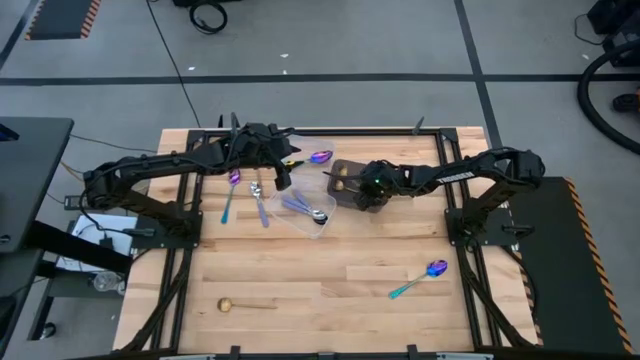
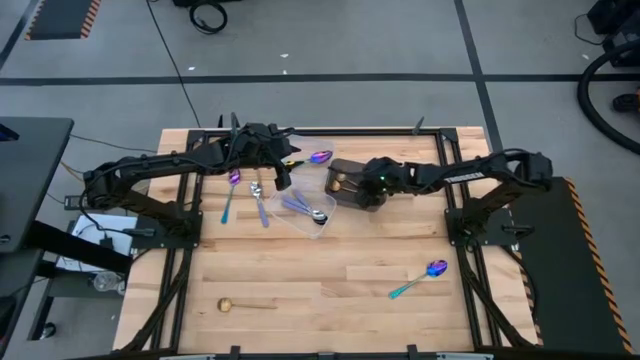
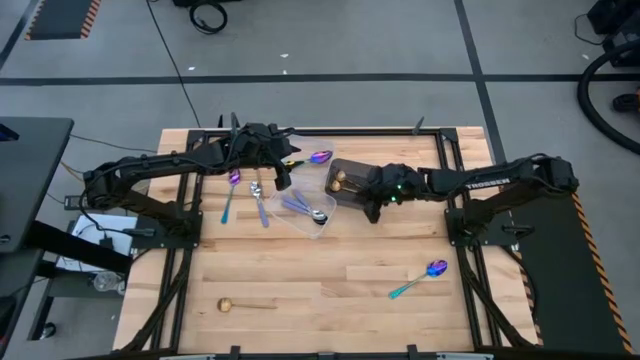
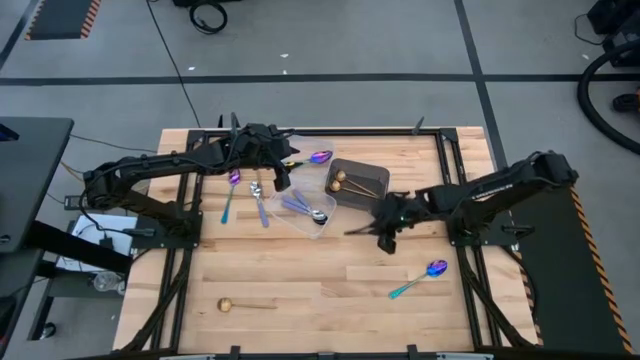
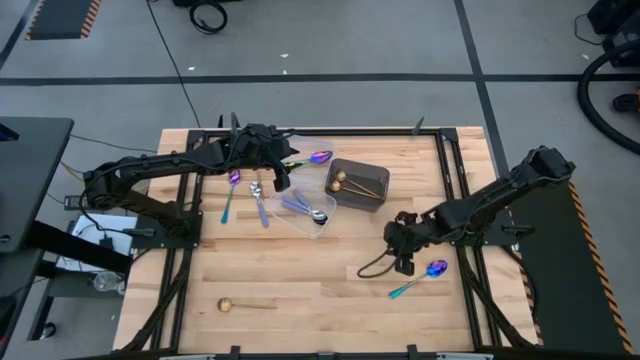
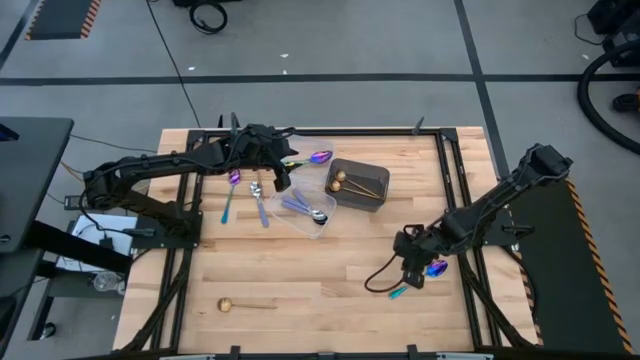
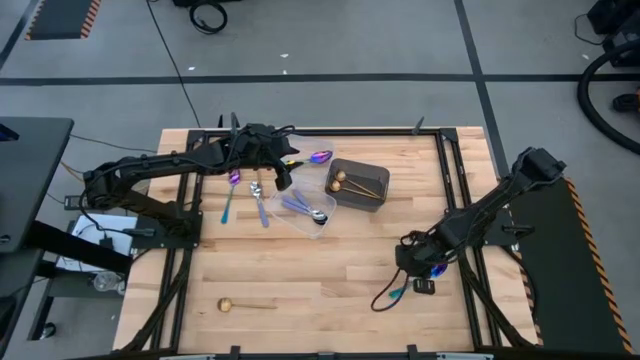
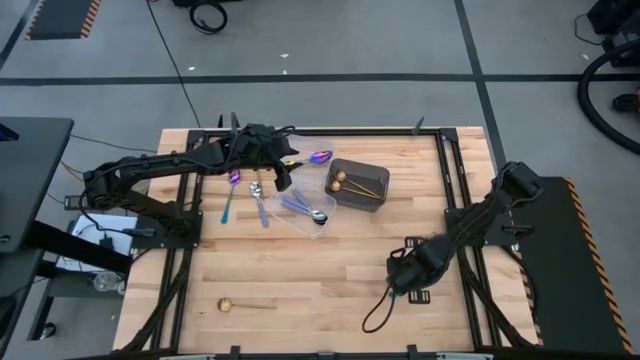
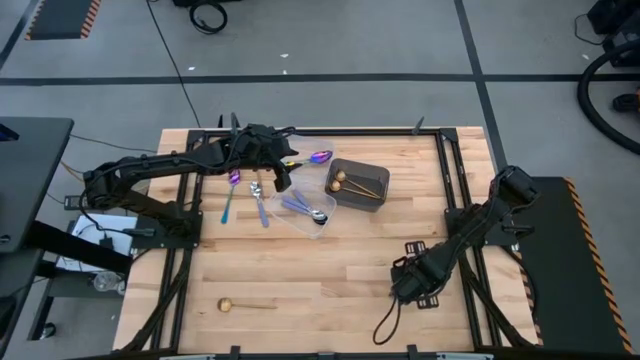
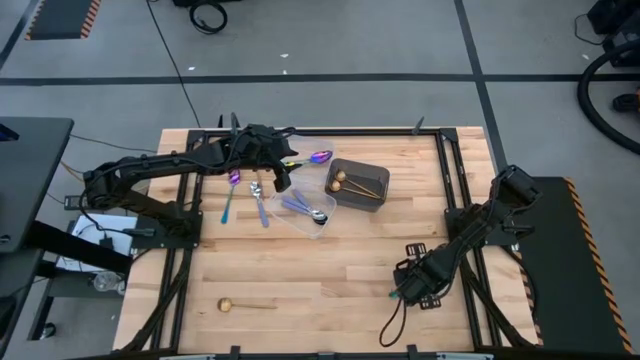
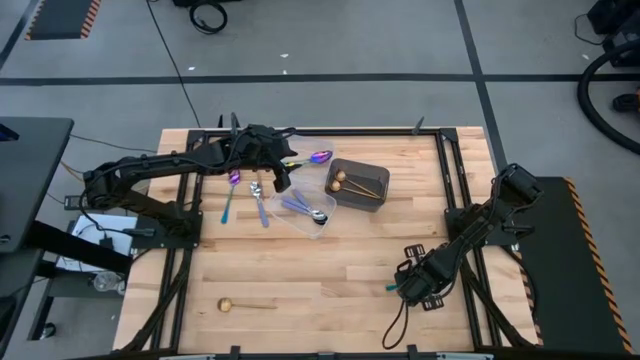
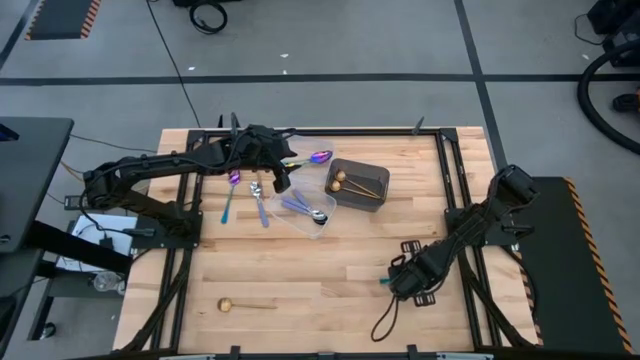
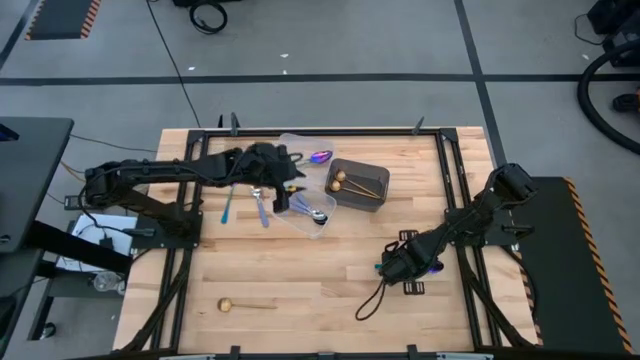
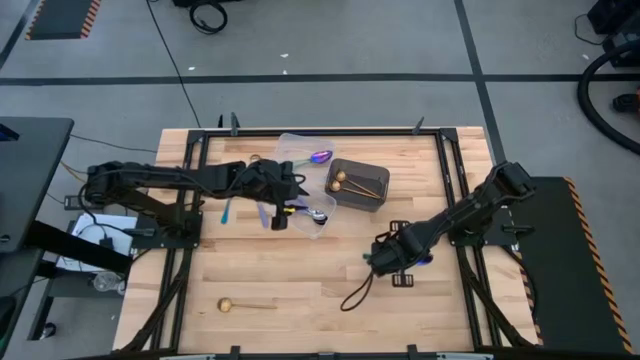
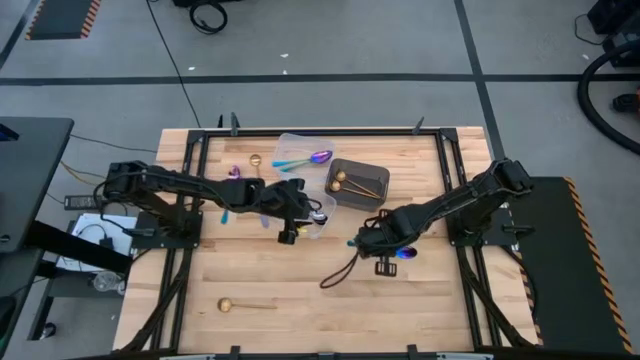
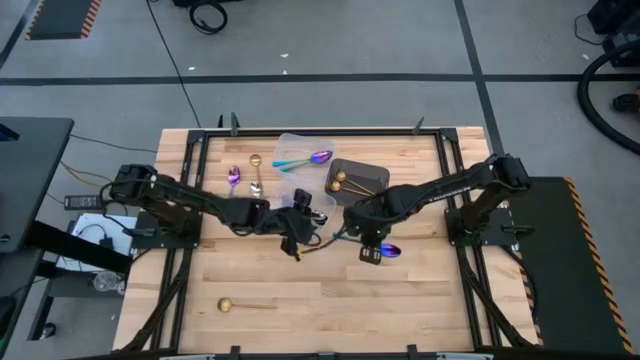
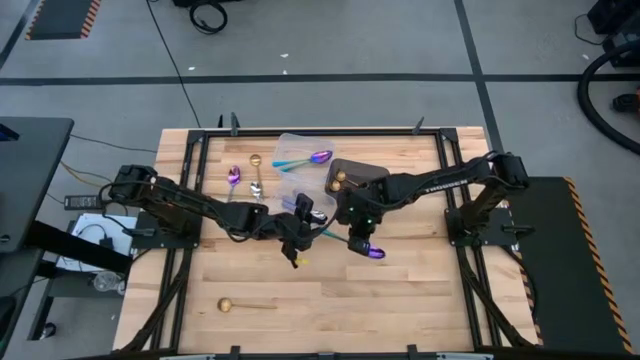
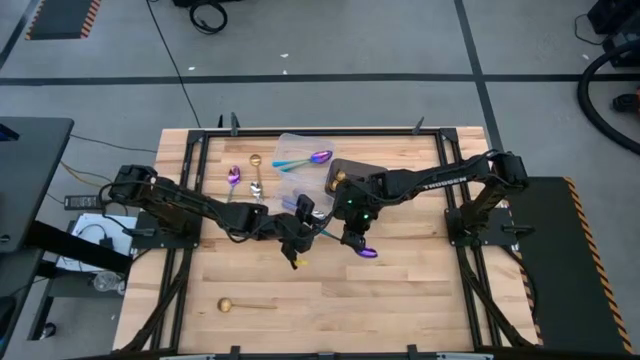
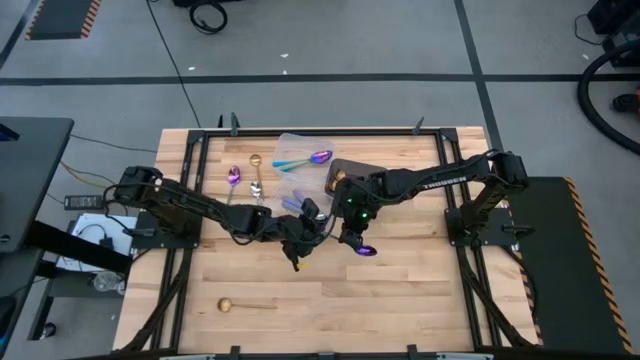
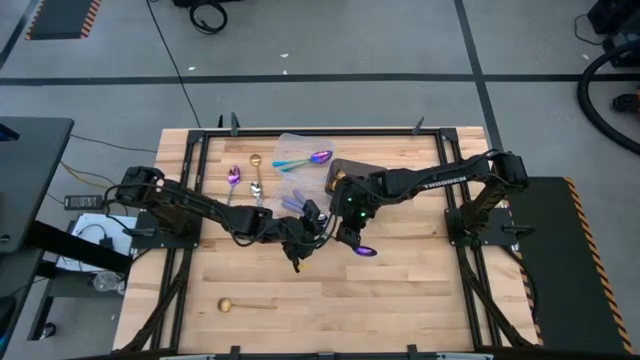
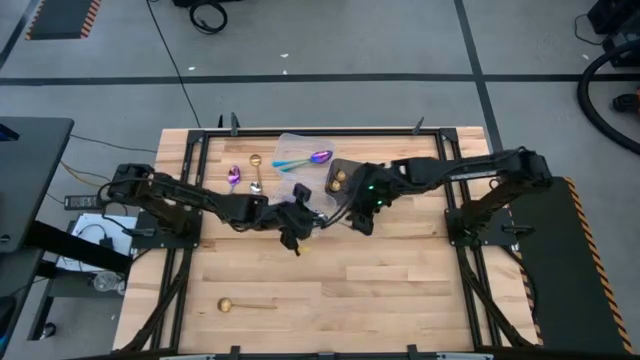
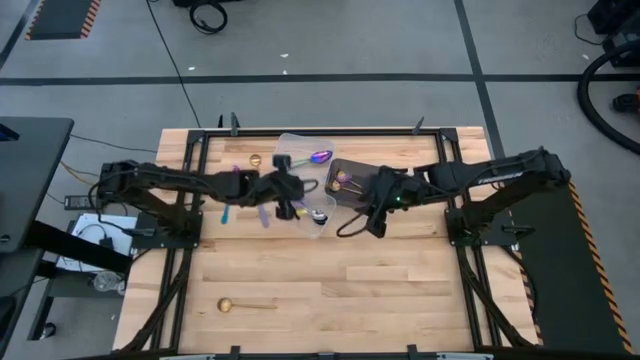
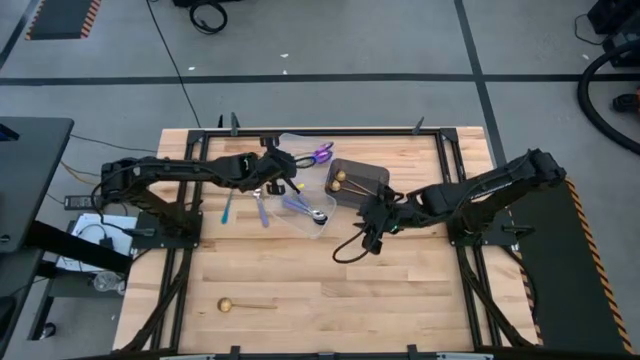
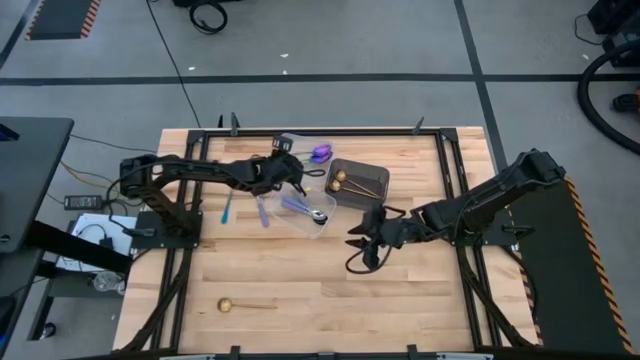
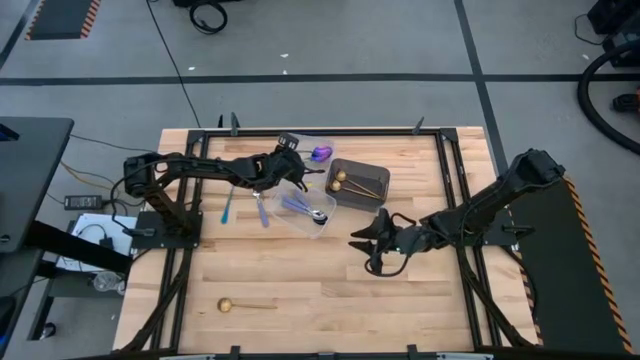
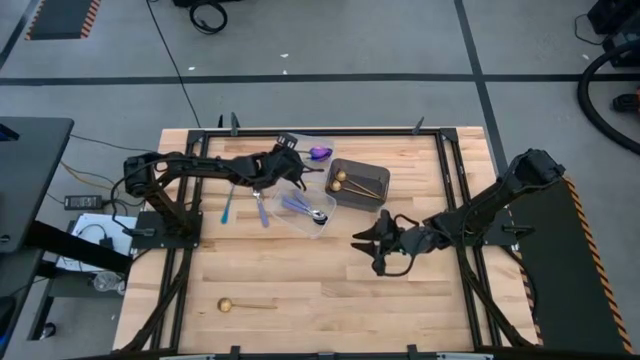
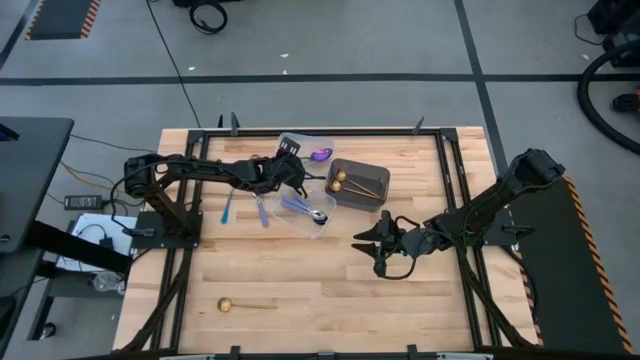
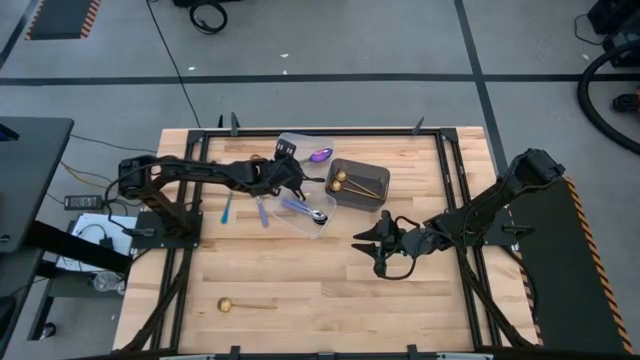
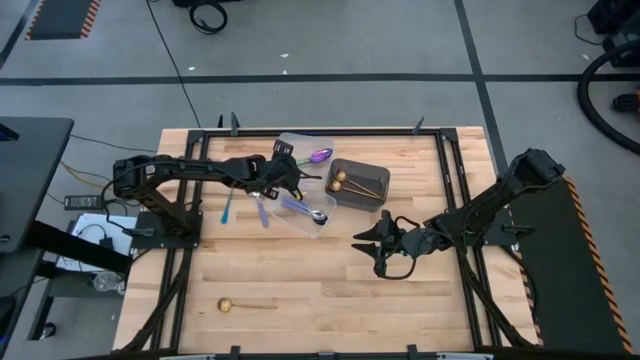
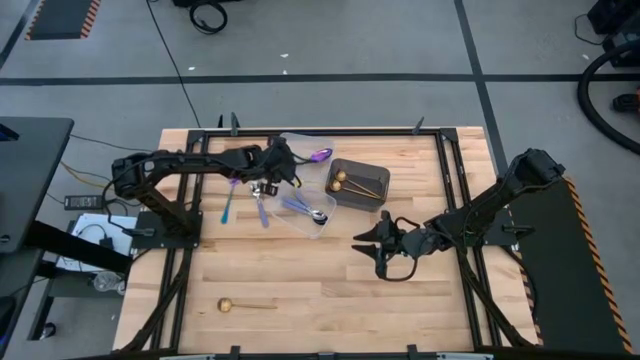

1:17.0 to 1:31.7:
Task: Sort silverware by color (type)
Put the blue spoon into the top transparent bin

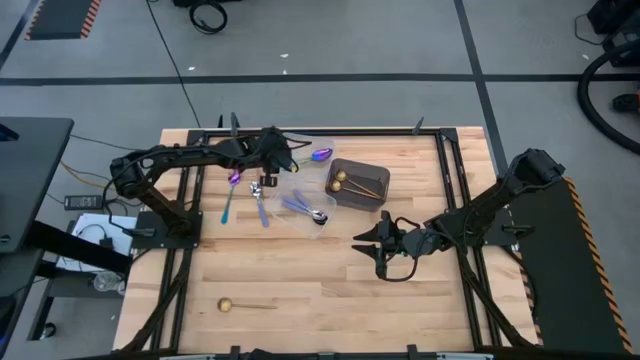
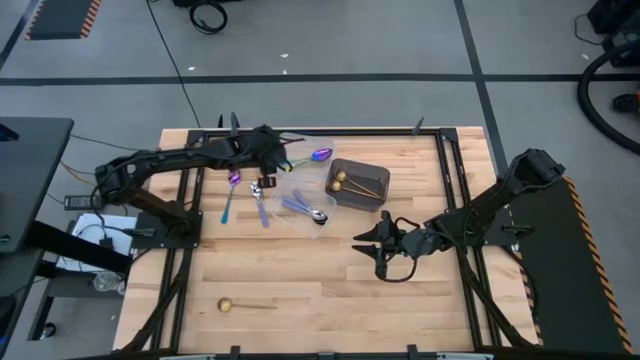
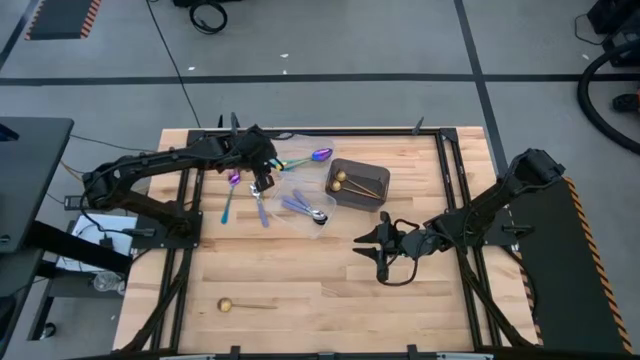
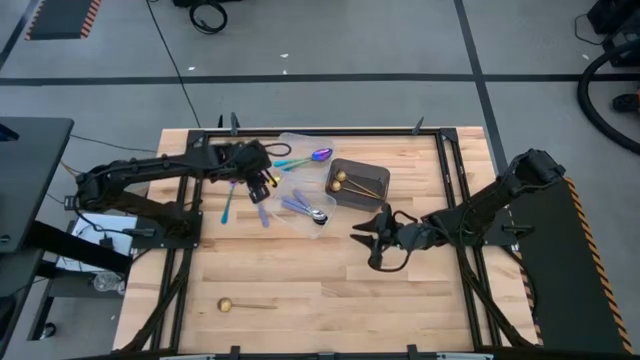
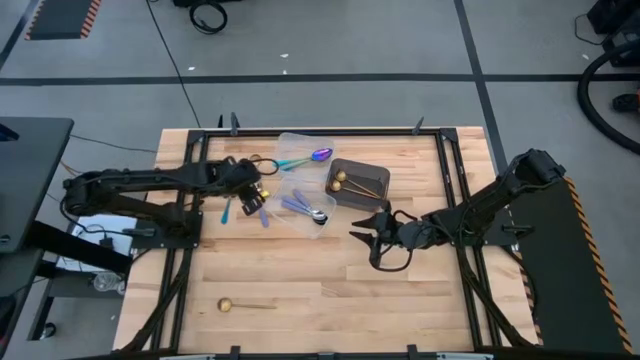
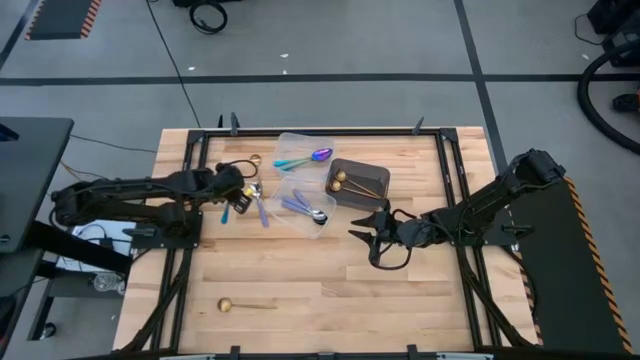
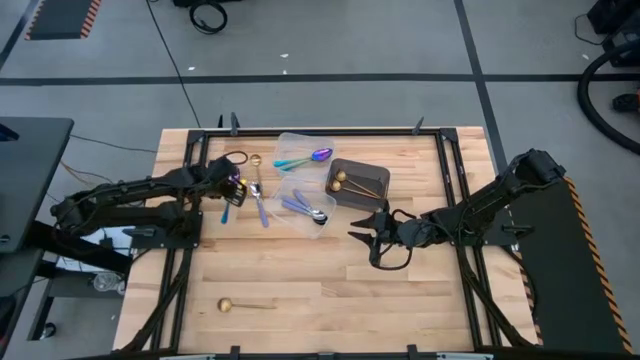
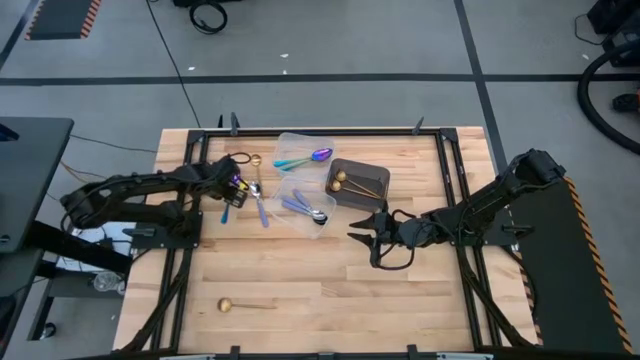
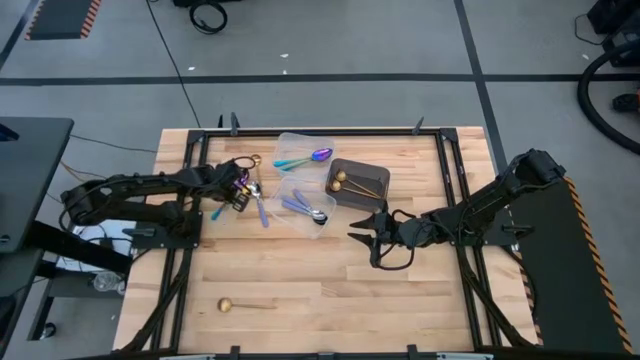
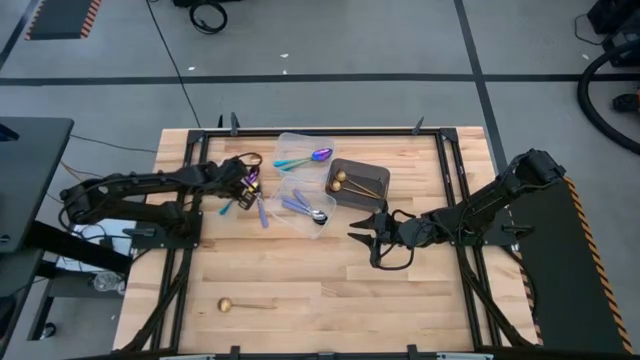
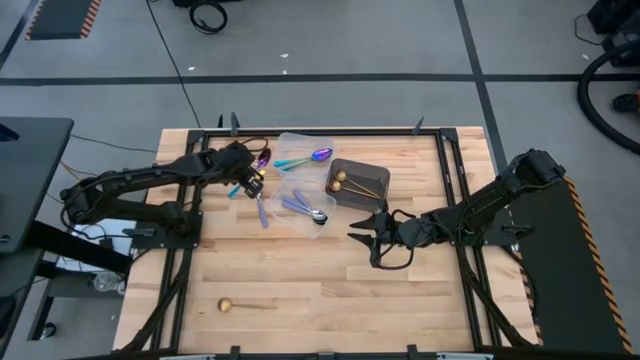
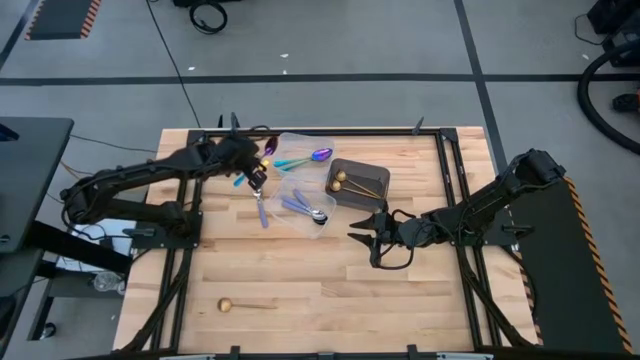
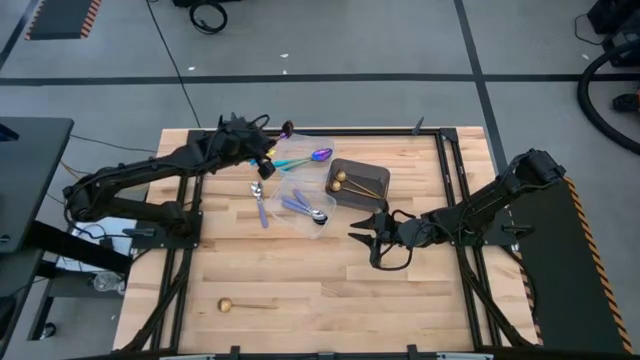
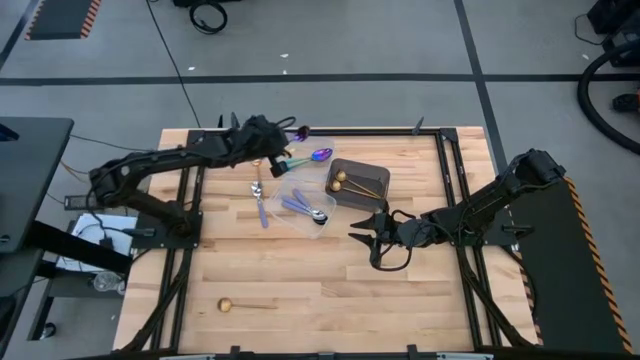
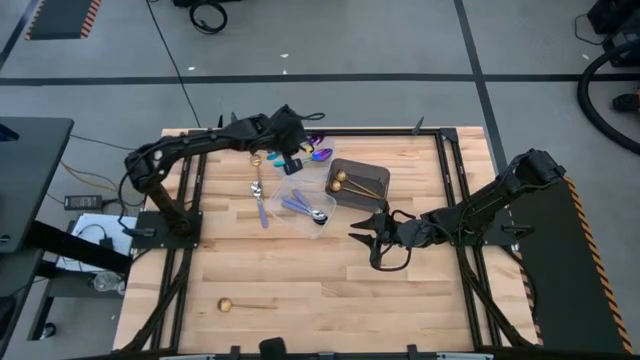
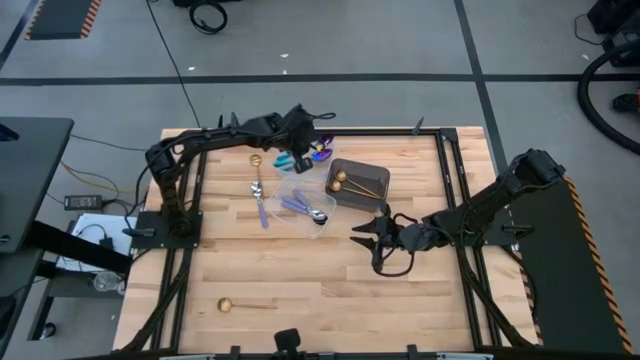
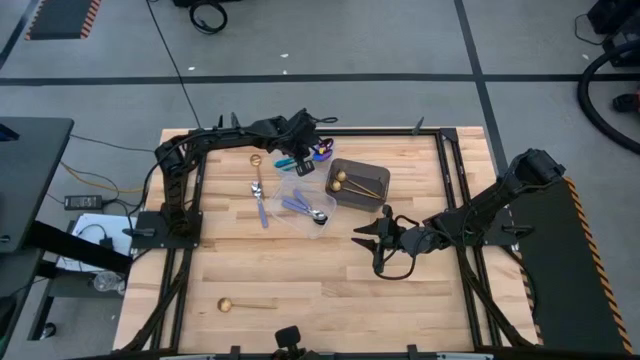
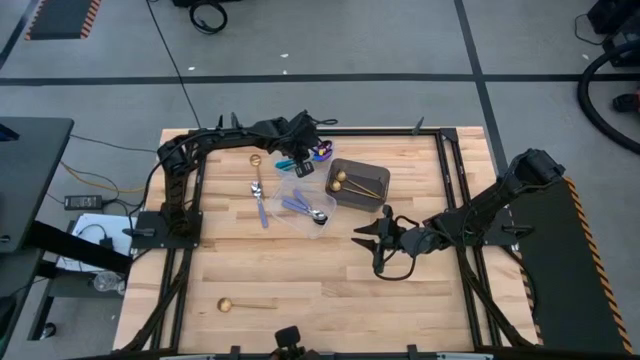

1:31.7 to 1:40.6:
Put the blue spoon into the top transparent bin
